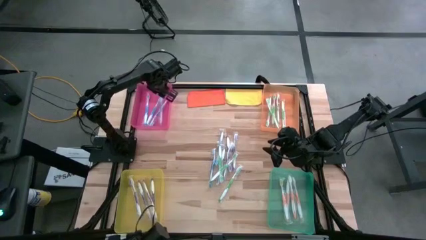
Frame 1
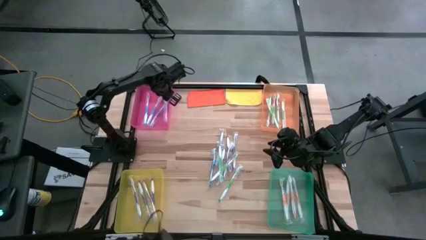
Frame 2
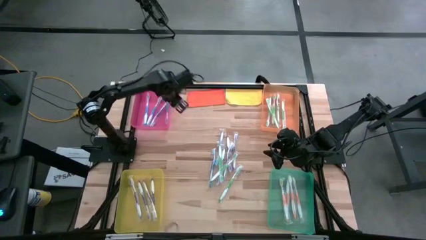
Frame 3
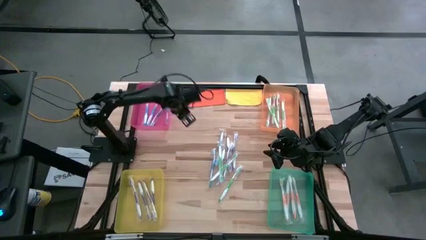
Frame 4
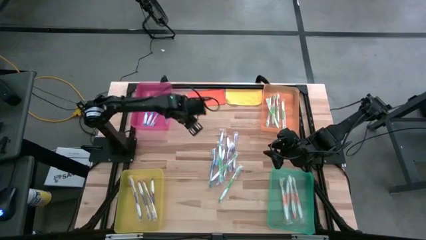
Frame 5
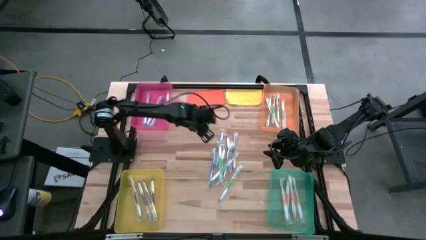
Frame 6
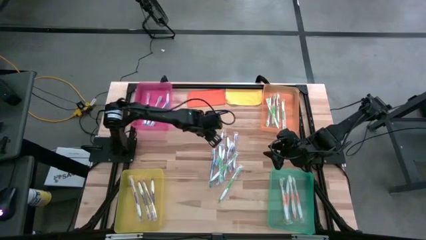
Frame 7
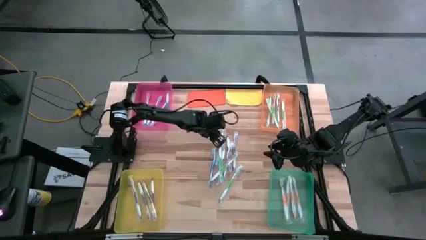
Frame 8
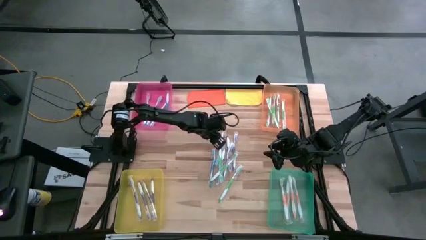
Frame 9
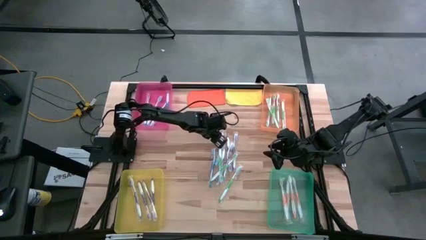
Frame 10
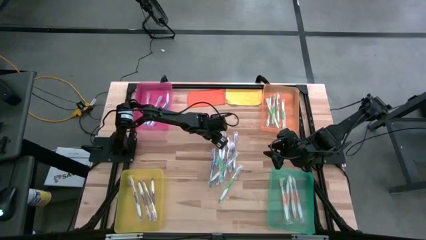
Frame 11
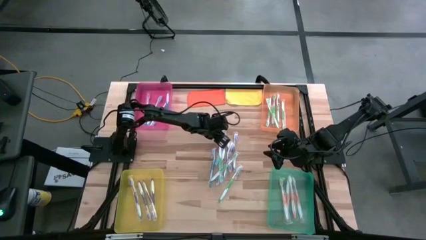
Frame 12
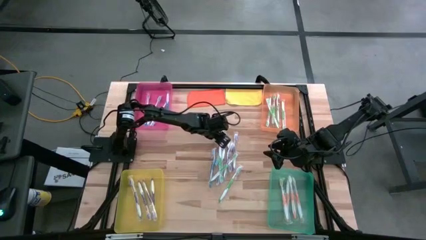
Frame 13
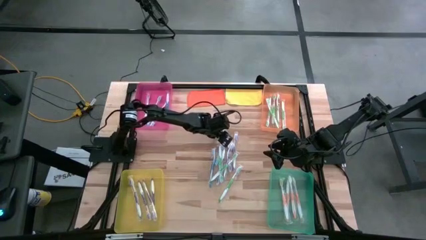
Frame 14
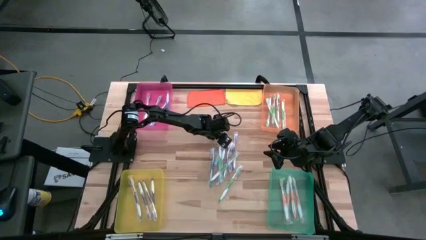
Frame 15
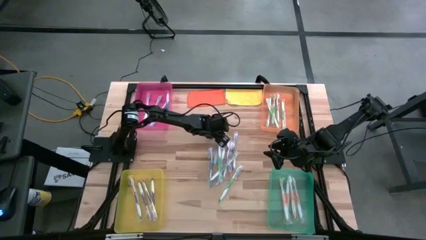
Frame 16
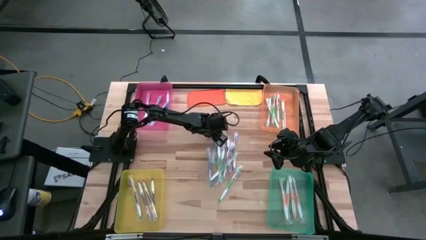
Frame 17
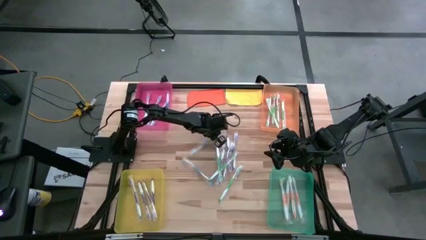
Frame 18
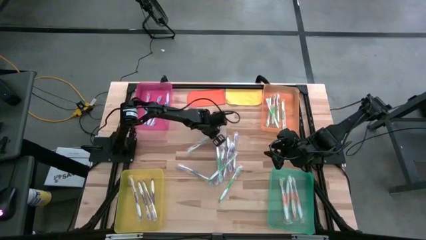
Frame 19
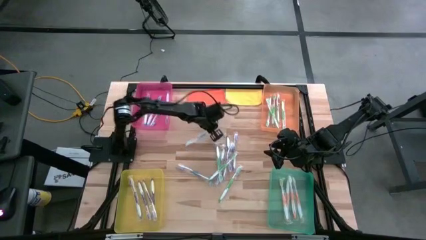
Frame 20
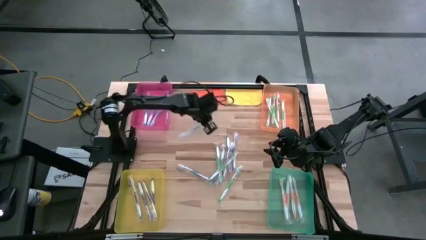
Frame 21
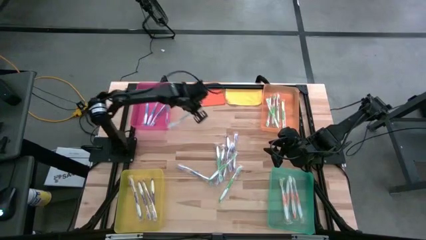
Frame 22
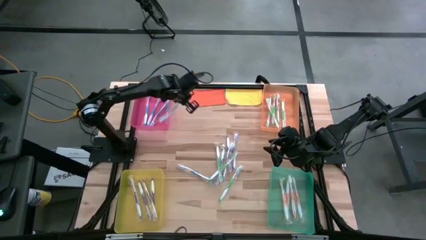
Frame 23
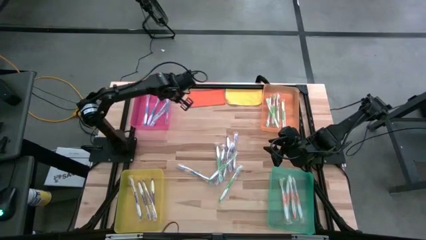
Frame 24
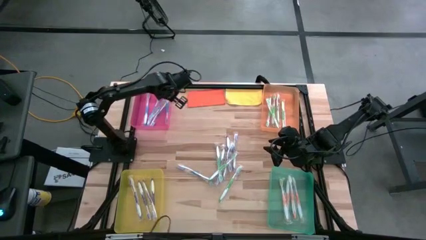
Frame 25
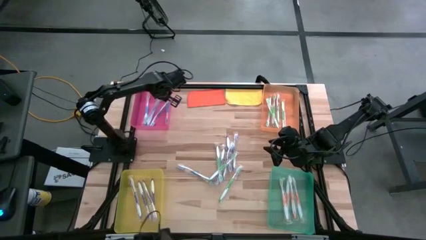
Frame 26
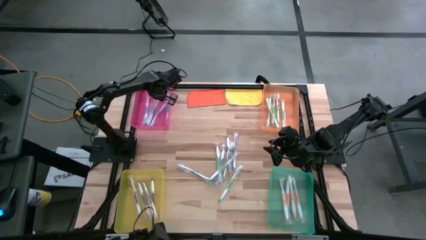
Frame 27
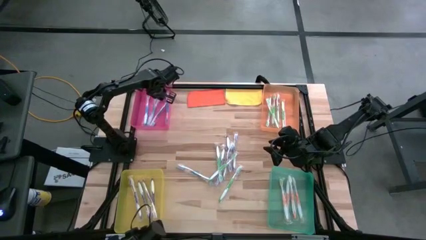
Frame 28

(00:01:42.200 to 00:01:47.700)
Task: Pick & Place Toothbrushes
Put the blue toothbrush into the red bin

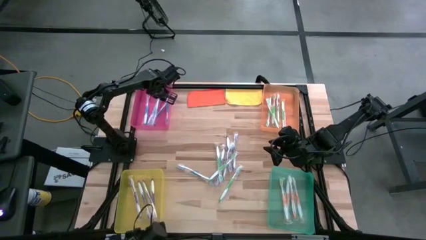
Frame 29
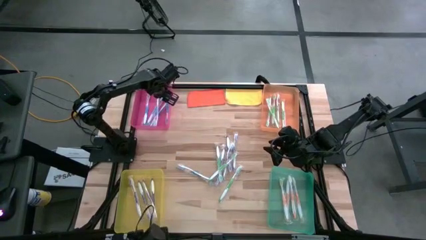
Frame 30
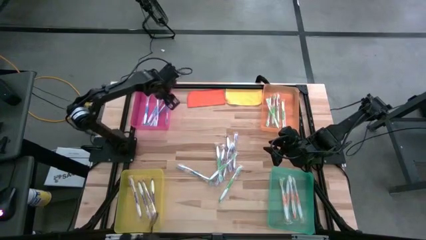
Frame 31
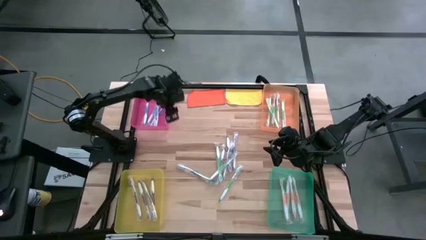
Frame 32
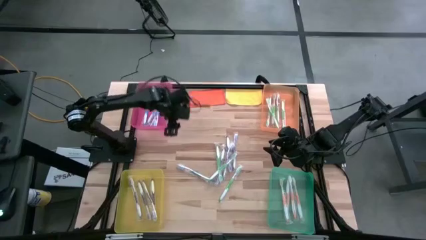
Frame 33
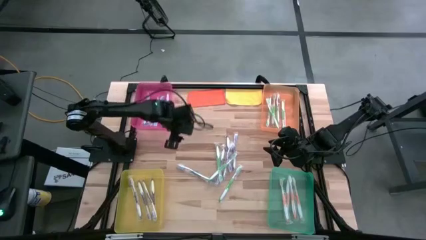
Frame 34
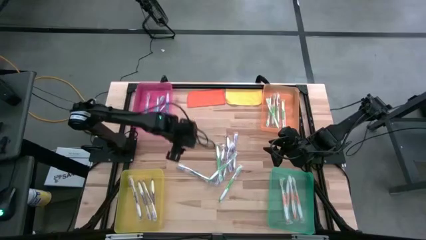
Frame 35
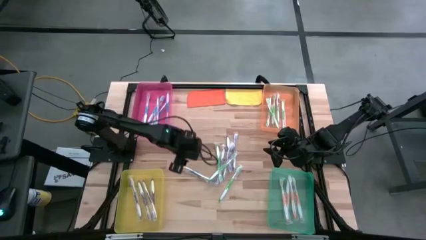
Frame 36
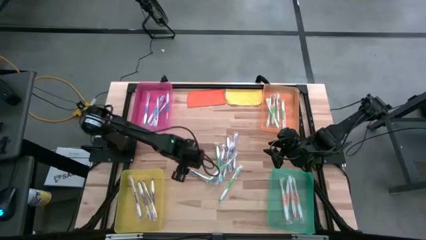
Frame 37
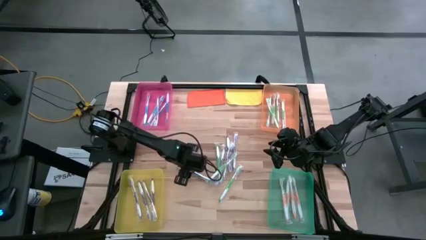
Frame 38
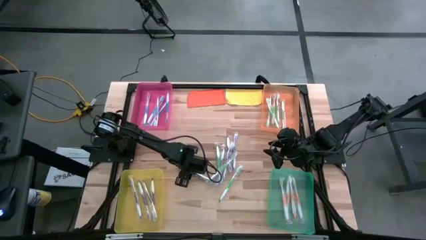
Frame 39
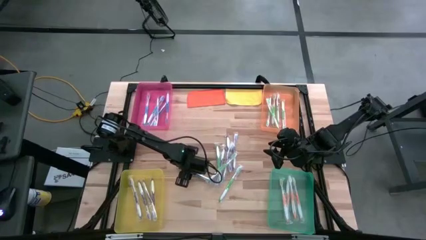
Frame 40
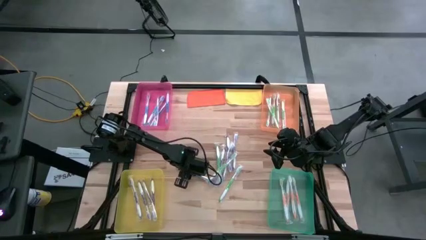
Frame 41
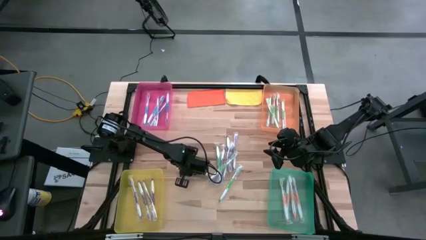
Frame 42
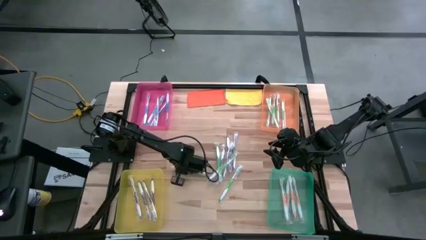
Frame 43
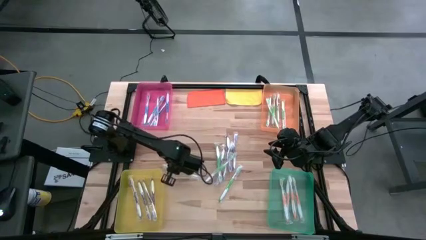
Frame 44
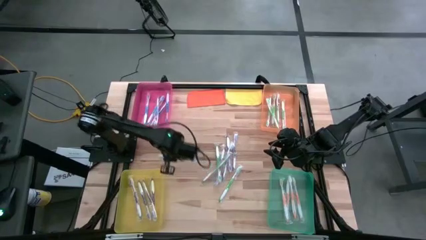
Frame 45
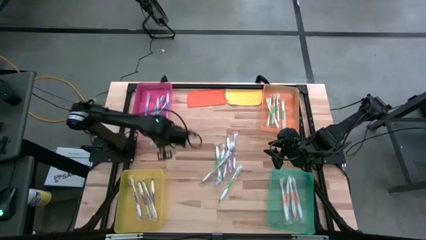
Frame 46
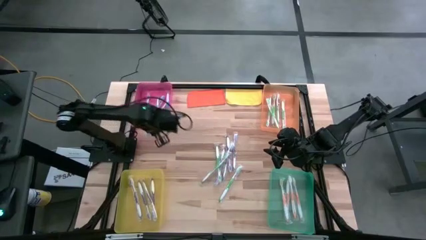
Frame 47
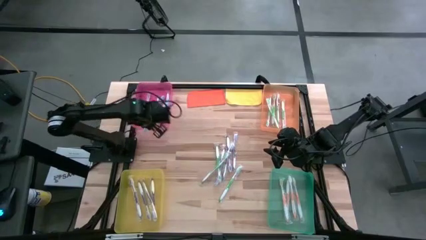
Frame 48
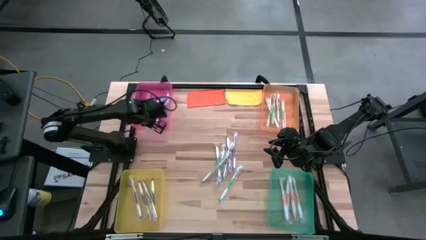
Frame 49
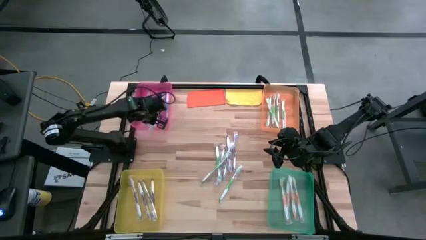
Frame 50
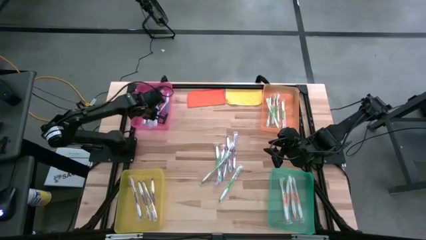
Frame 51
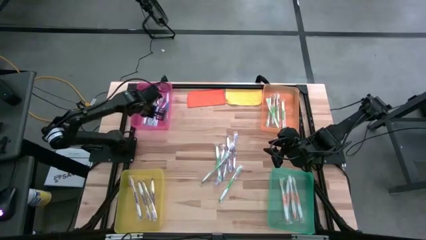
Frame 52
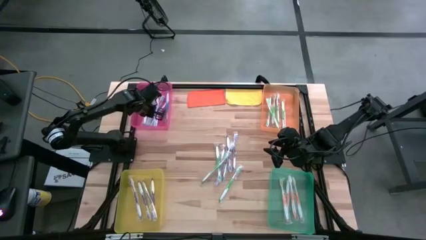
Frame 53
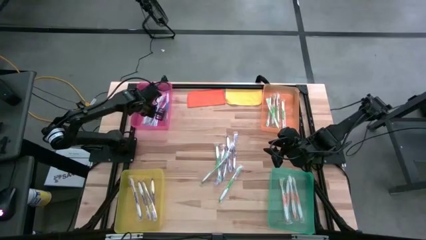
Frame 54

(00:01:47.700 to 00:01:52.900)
Put the blue toothbrush into the red bin

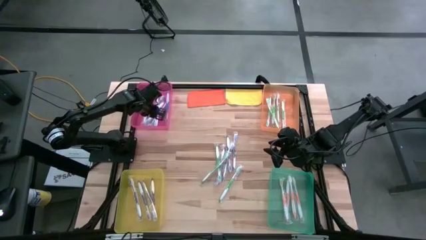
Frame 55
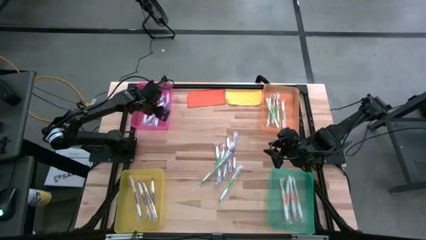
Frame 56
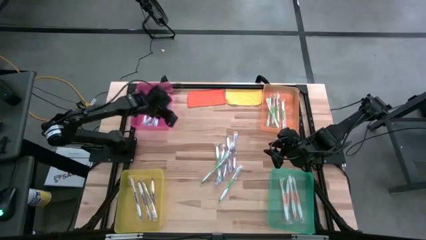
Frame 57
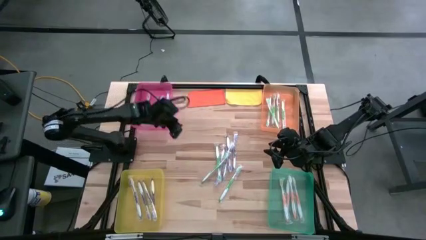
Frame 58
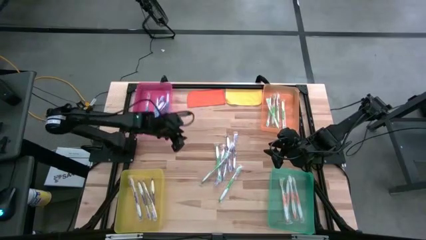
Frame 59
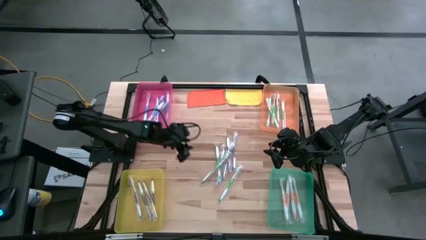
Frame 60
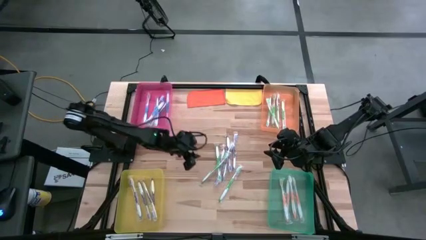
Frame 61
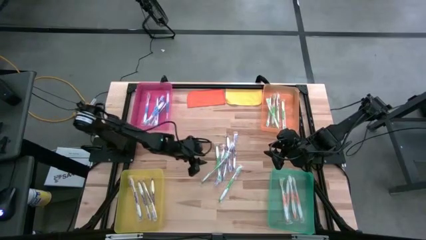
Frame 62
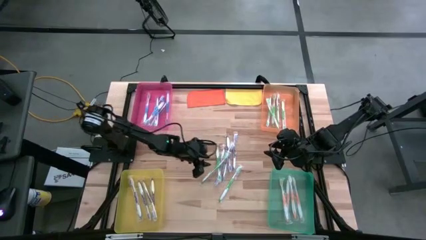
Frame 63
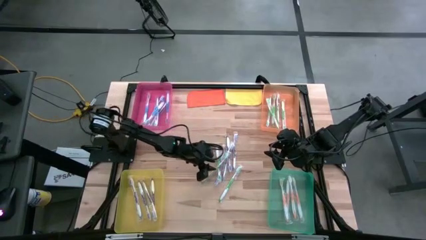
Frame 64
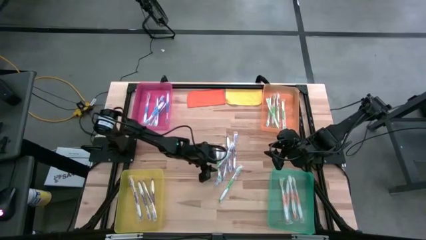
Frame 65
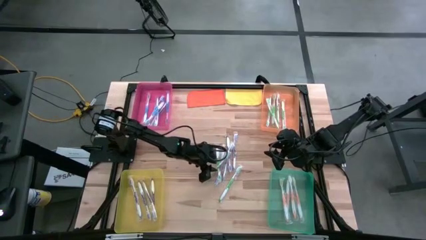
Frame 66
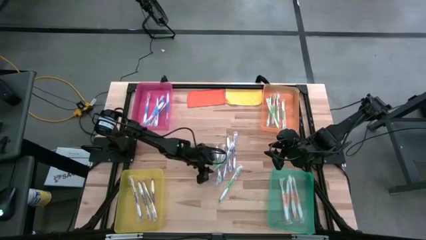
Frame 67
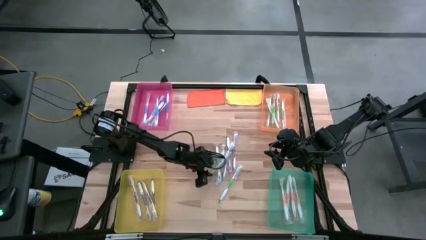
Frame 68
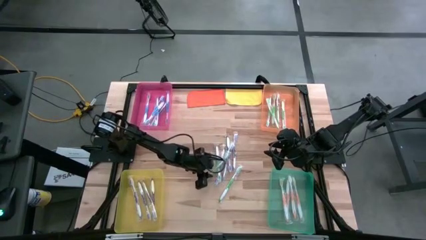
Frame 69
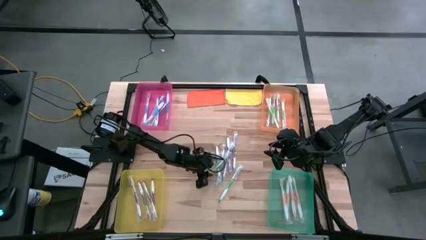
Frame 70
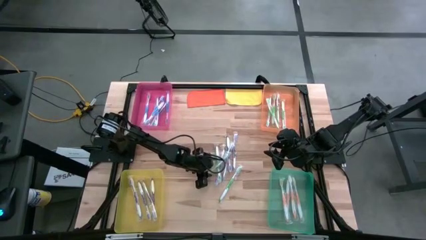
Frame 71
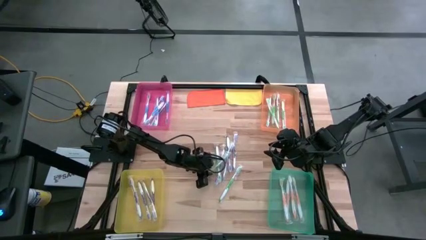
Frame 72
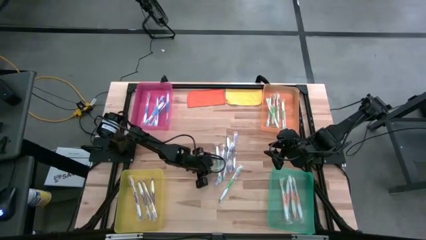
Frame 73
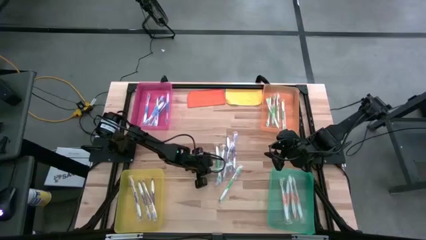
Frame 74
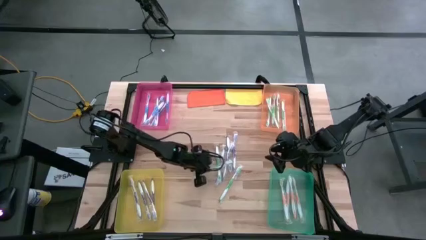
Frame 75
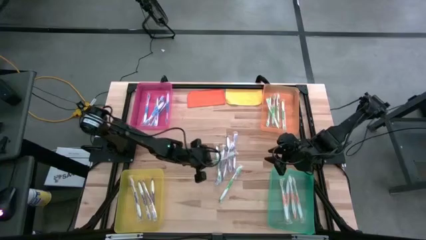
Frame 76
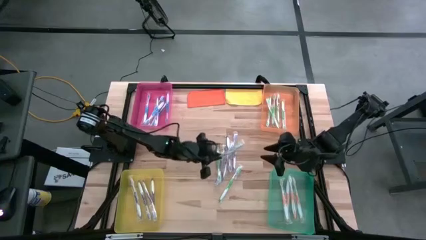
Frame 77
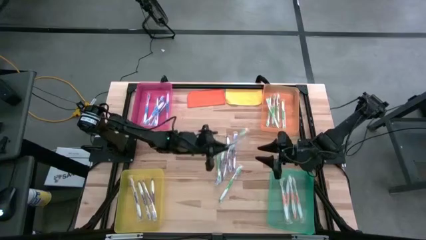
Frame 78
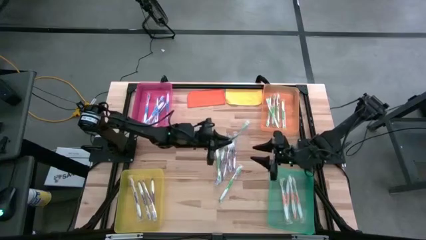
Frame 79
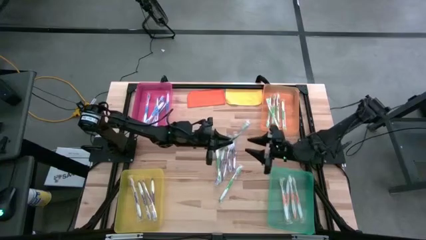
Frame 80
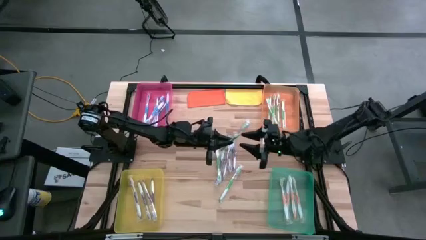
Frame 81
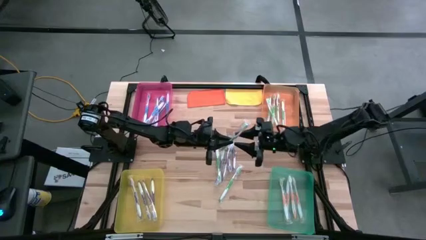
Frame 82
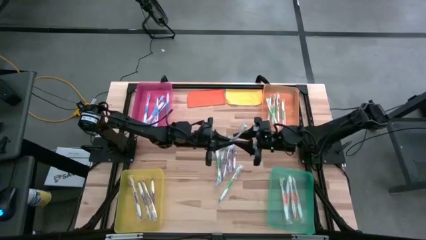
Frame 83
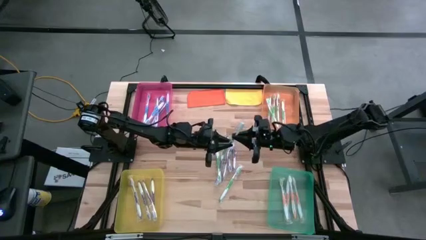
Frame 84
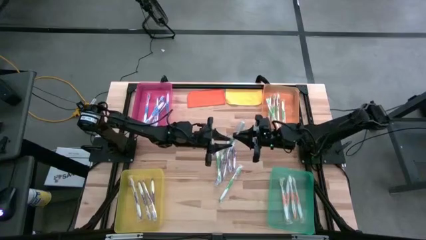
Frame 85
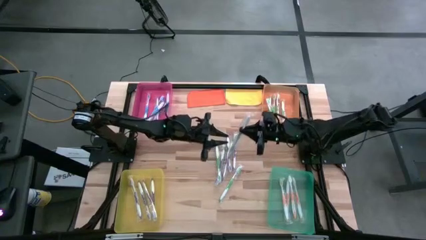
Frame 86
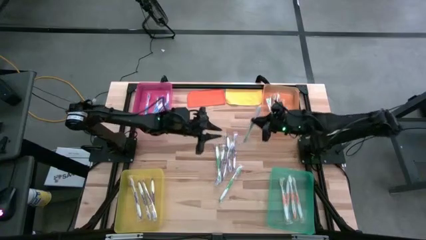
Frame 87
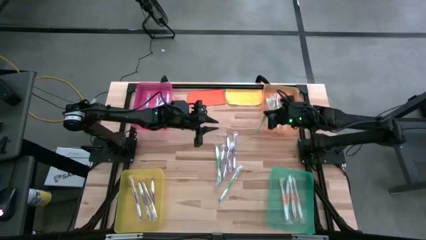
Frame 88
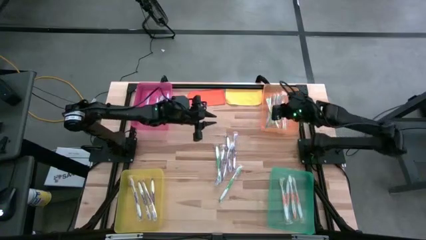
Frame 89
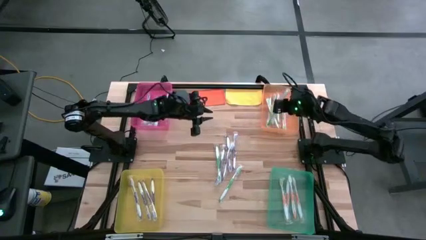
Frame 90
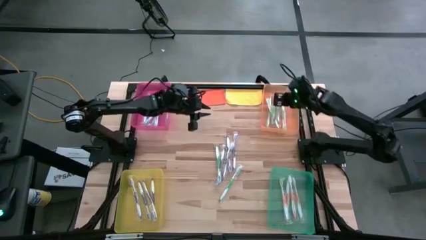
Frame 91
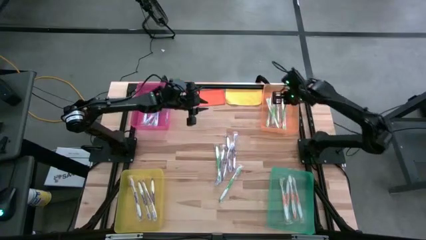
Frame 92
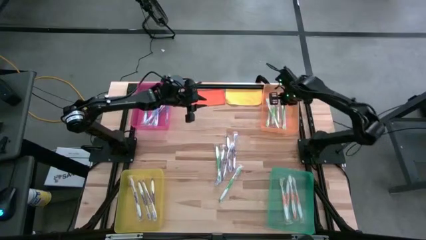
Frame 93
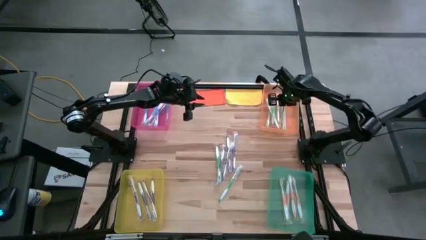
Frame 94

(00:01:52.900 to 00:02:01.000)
Put the green toothbrush into the orange bin
